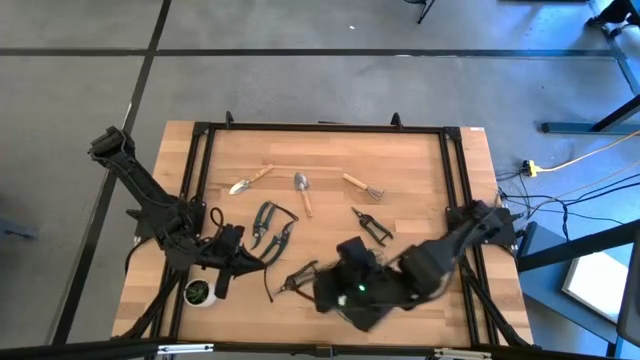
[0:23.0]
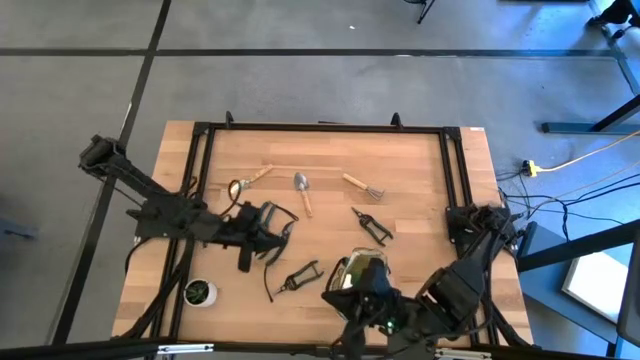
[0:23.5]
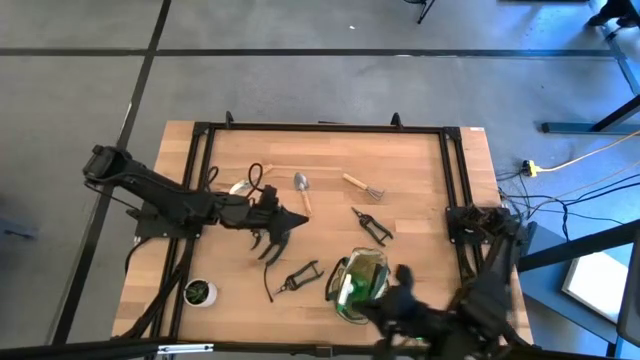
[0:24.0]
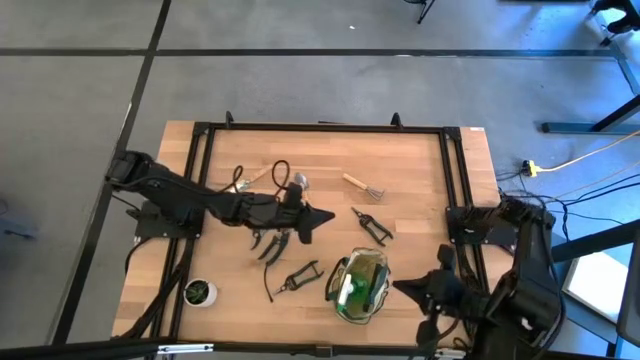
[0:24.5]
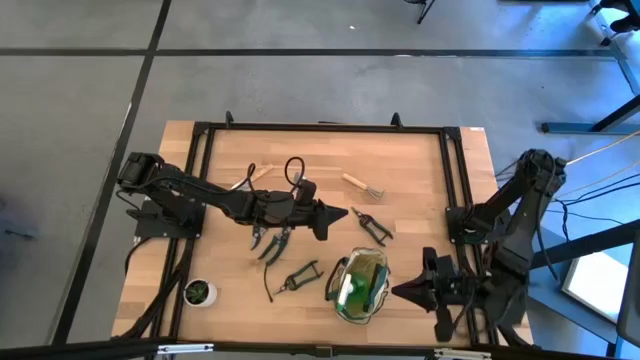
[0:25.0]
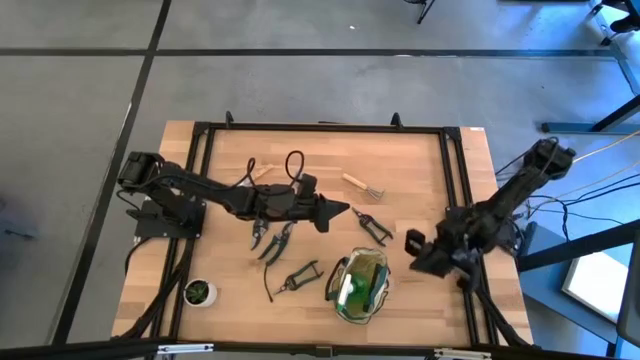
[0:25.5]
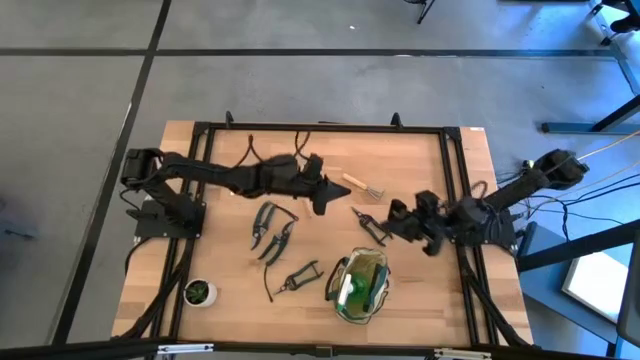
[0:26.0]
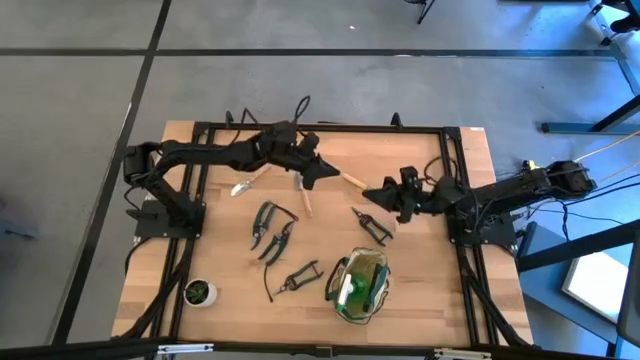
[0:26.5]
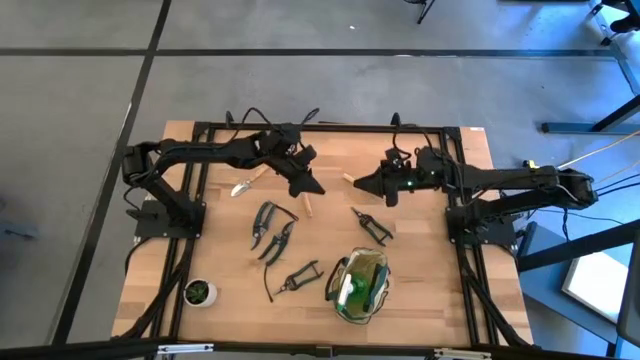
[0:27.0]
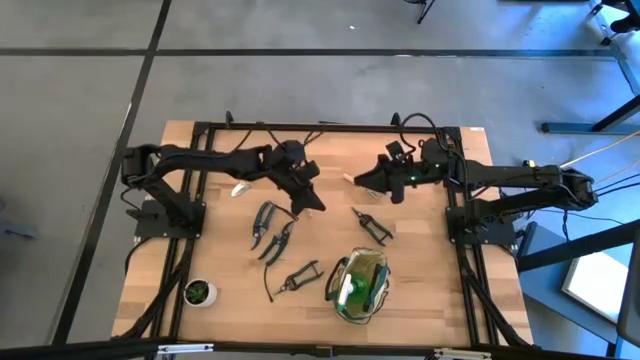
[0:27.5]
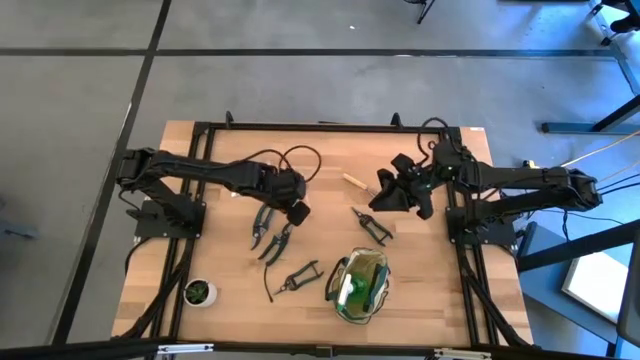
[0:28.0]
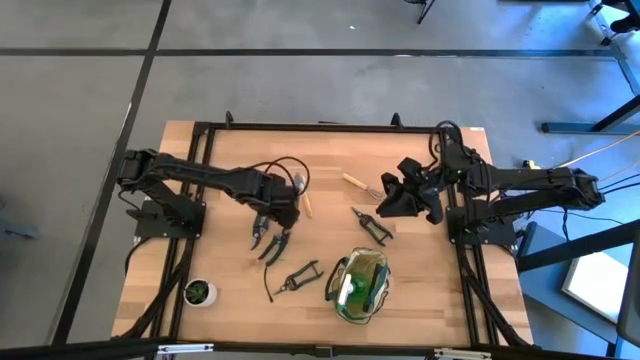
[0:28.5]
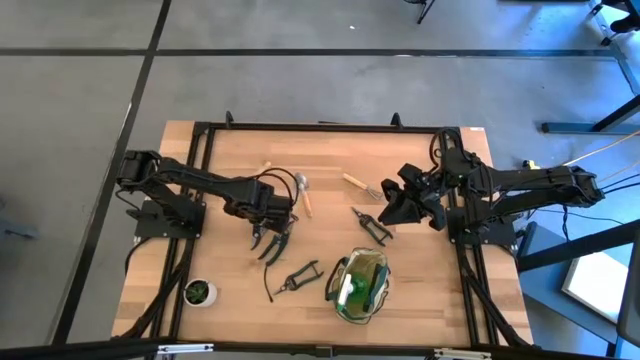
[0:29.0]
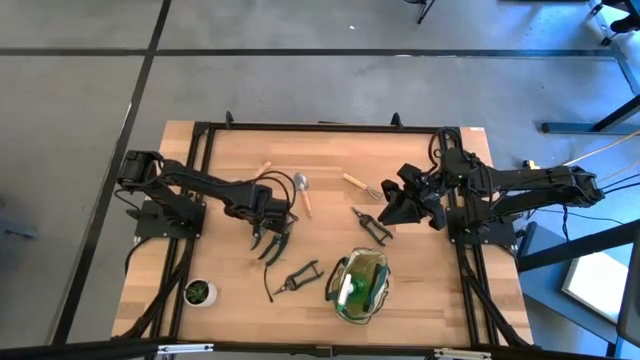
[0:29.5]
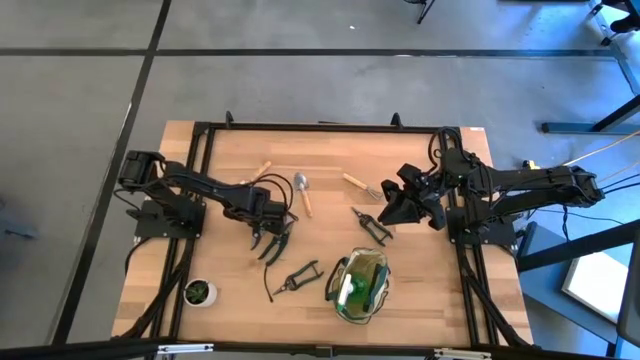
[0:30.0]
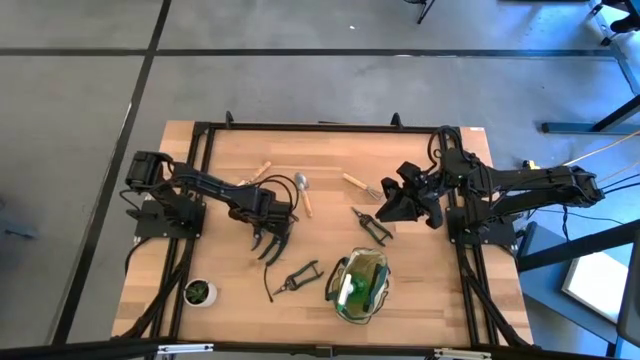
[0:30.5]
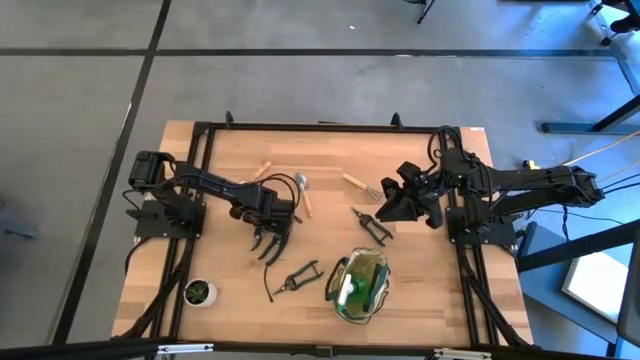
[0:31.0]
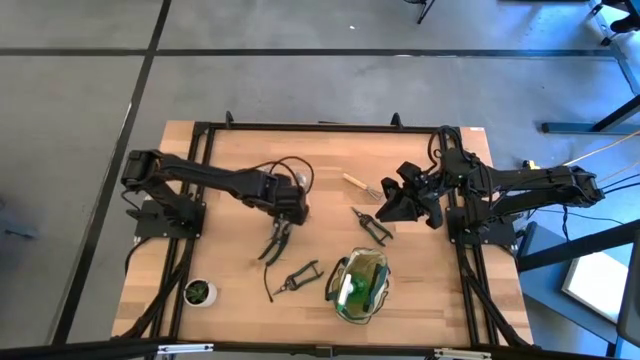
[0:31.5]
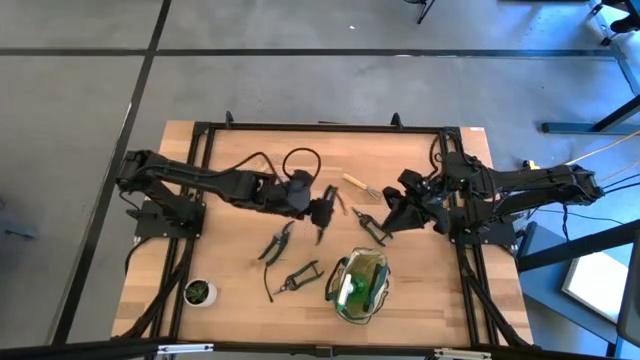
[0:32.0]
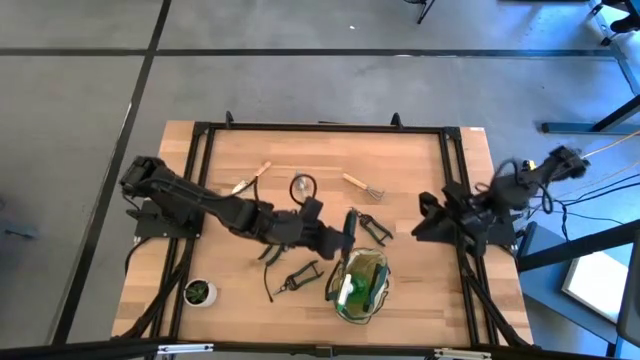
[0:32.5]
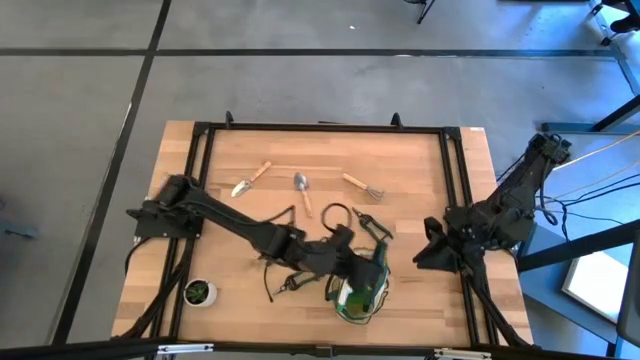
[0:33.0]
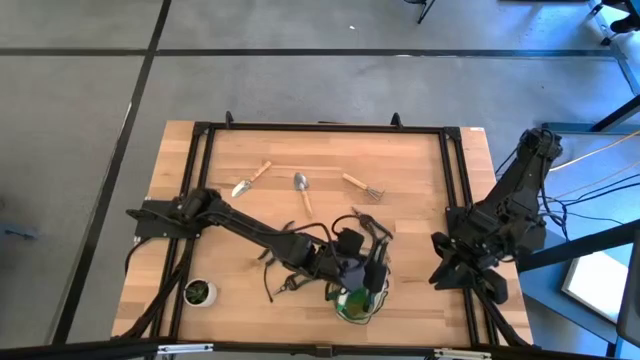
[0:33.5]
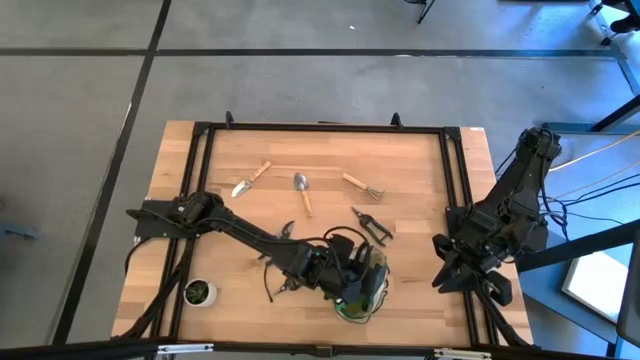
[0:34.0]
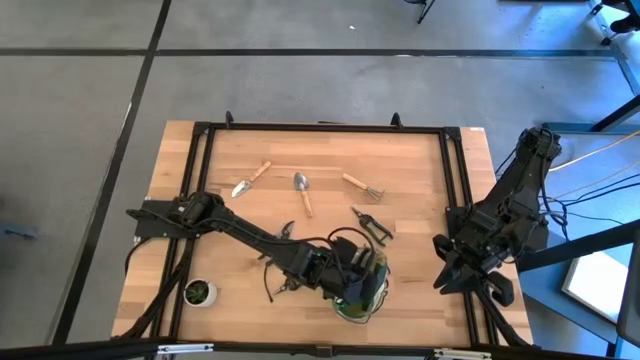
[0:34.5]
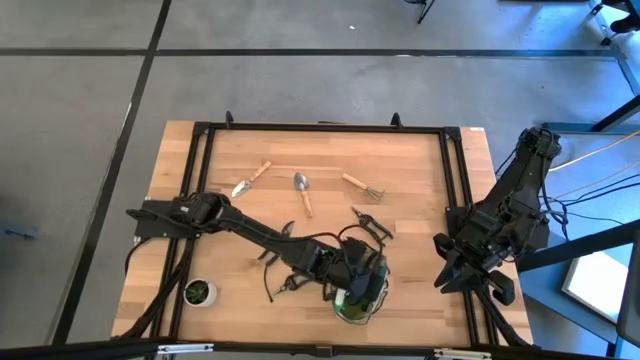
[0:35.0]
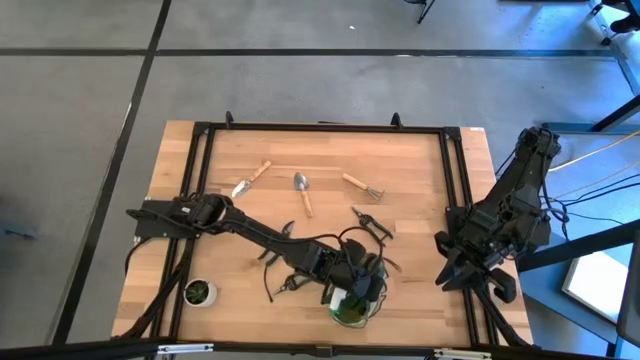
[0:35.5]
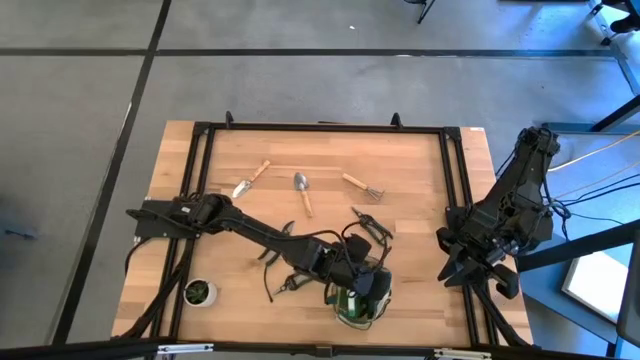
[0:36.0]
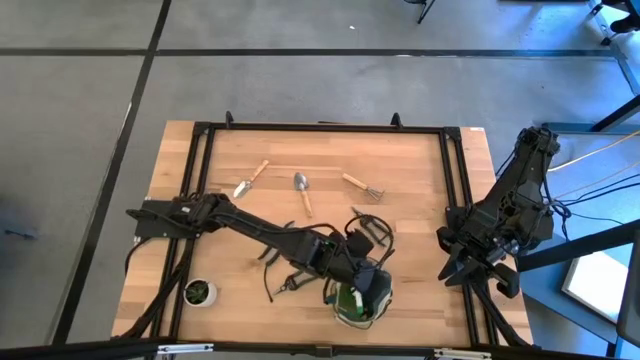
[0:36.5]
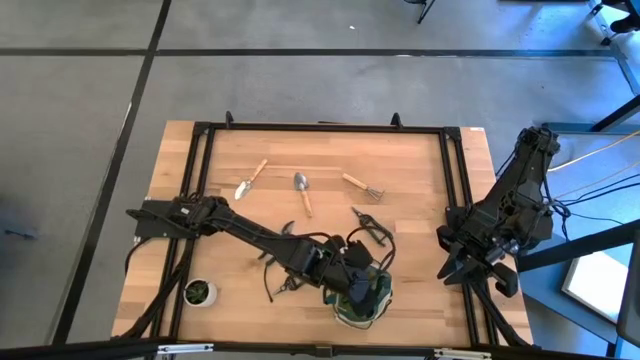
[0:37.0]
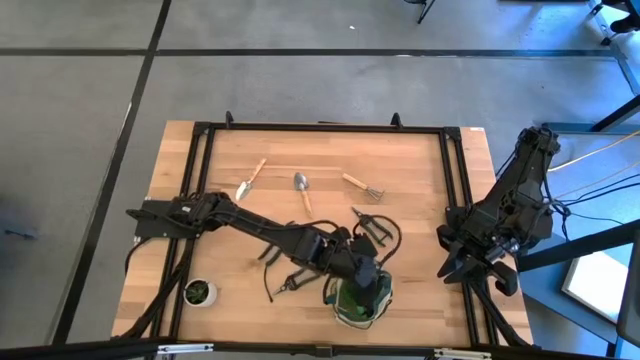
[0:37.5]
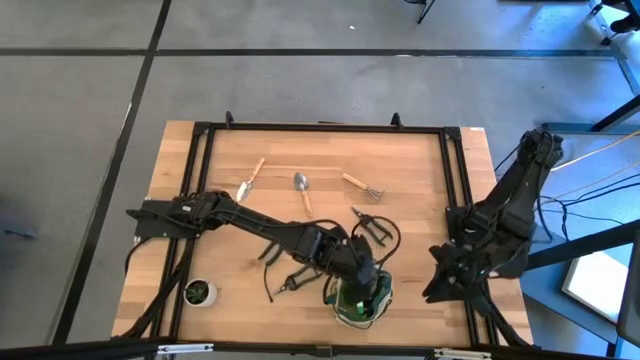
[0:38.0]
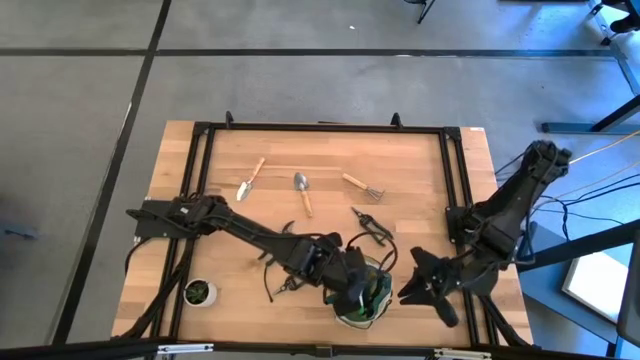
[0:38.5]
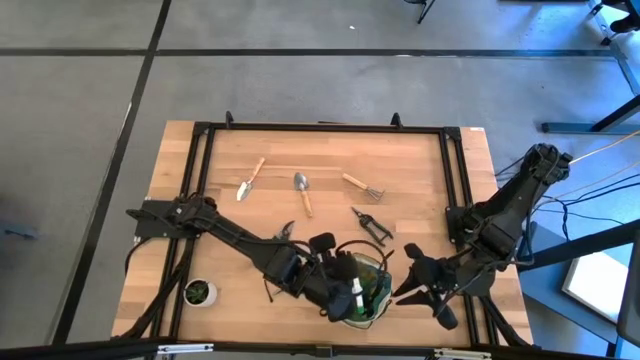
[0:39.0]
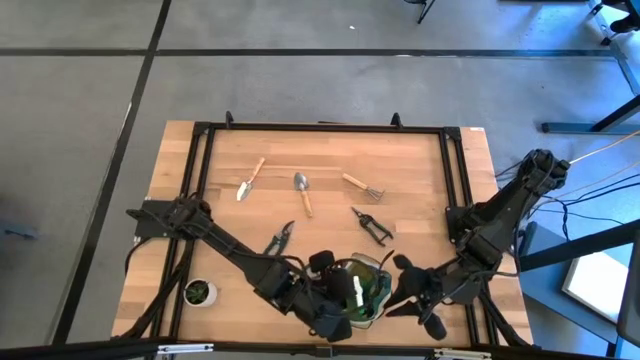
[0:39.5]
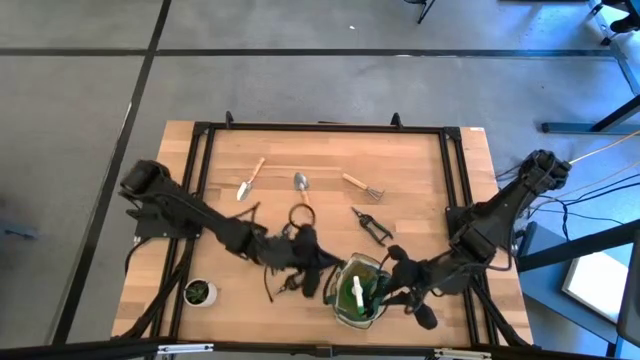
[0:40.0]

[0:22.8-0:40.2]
Task: Pick & Place Garden tools in Gardening bag
Put the green shear scissors into the gardening bag
